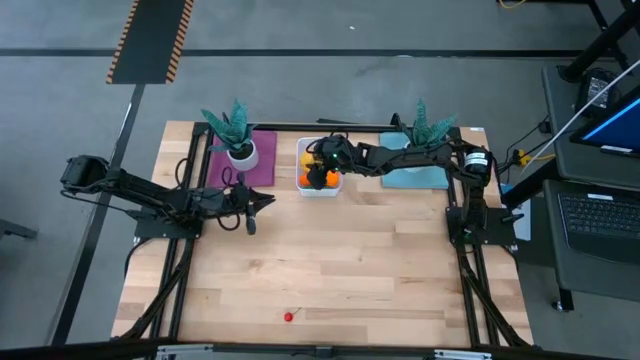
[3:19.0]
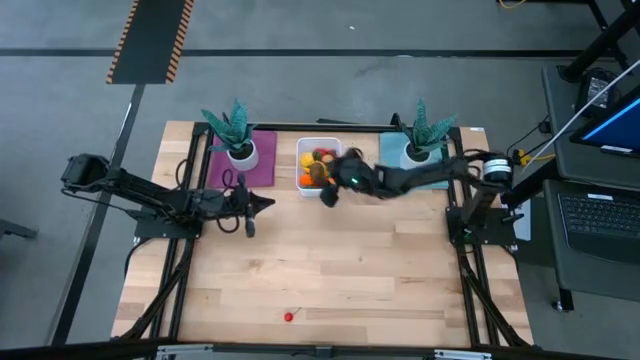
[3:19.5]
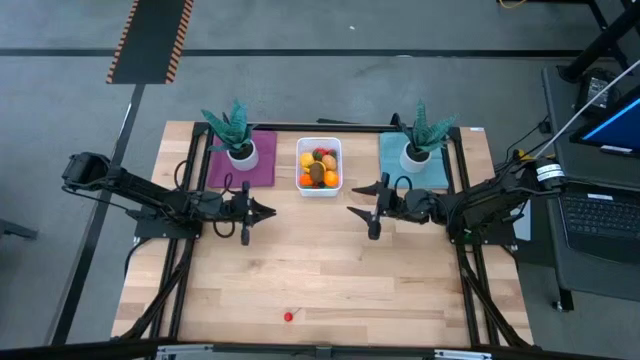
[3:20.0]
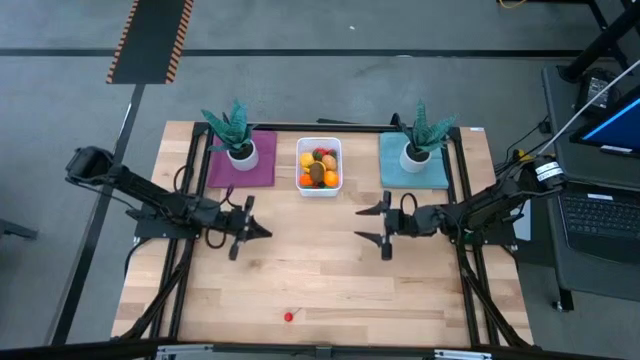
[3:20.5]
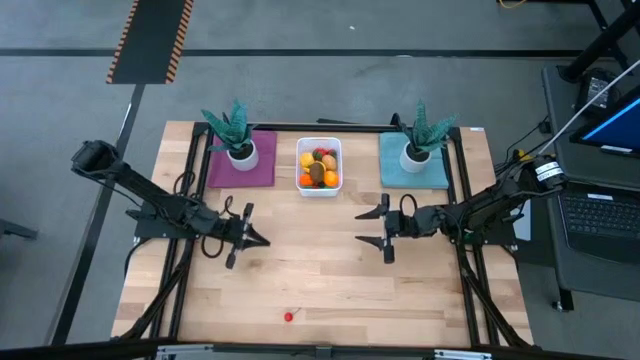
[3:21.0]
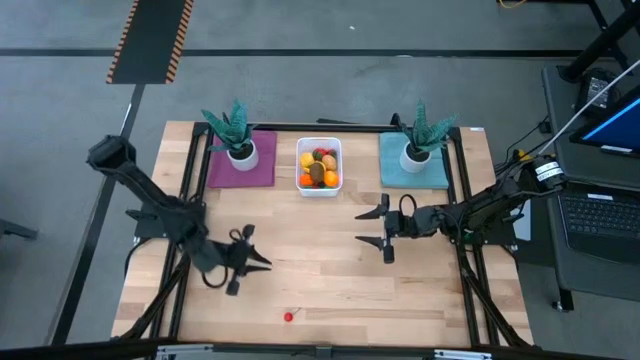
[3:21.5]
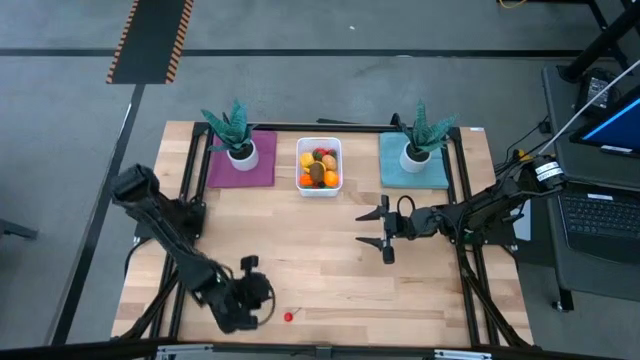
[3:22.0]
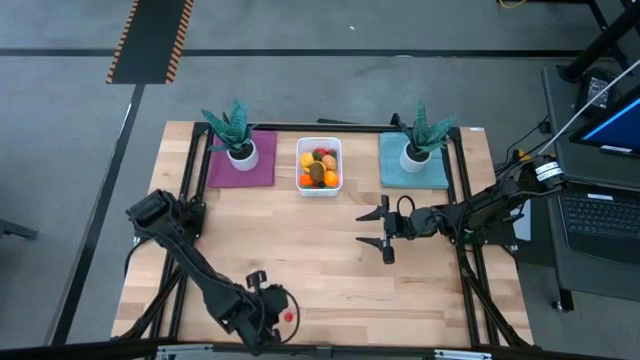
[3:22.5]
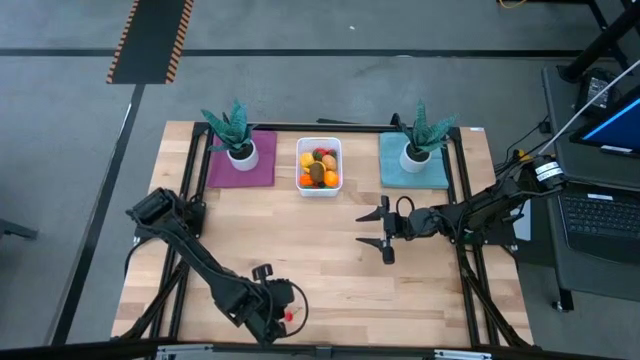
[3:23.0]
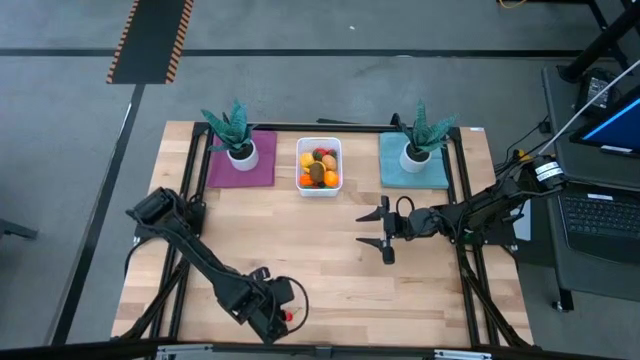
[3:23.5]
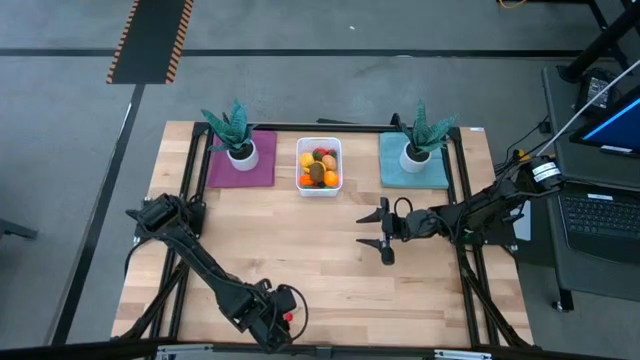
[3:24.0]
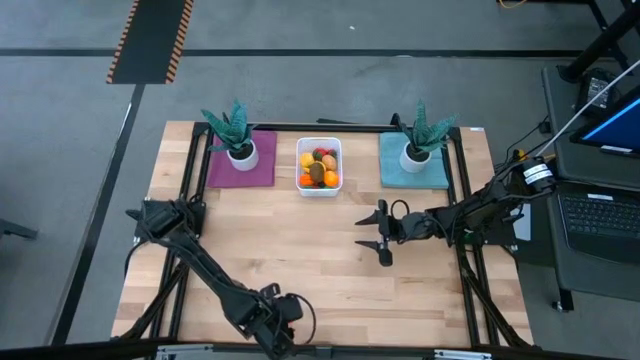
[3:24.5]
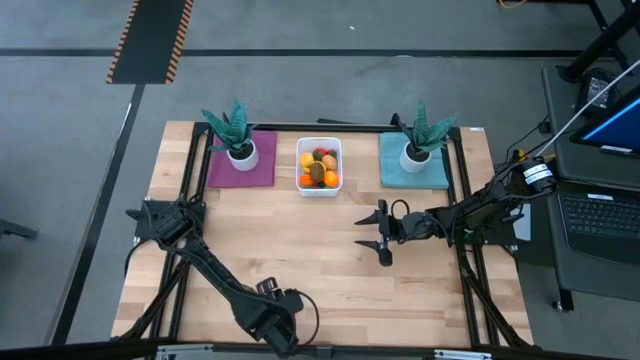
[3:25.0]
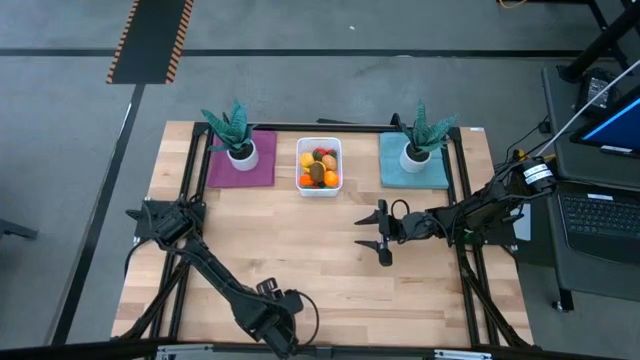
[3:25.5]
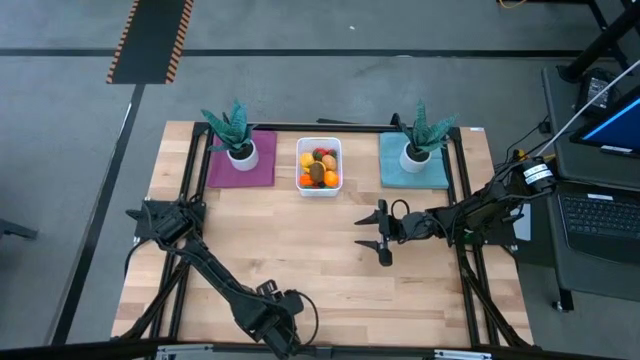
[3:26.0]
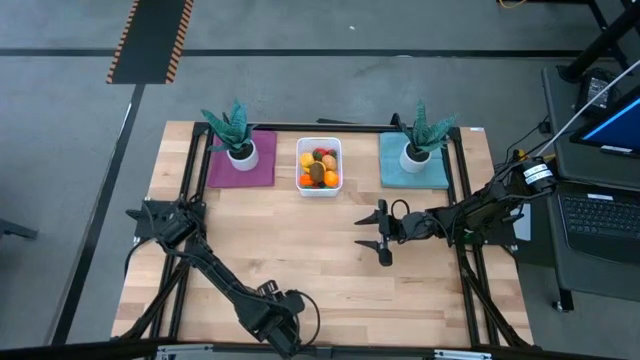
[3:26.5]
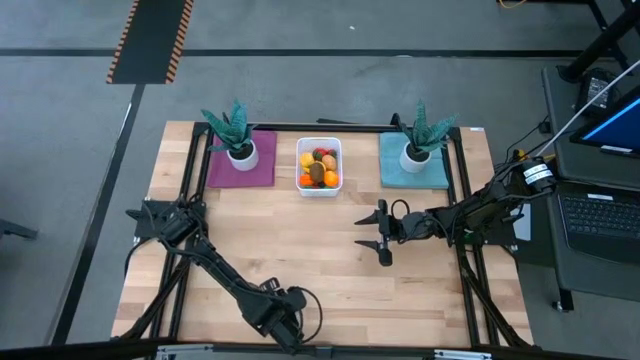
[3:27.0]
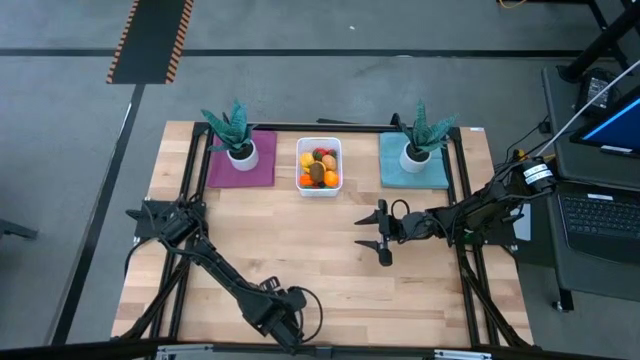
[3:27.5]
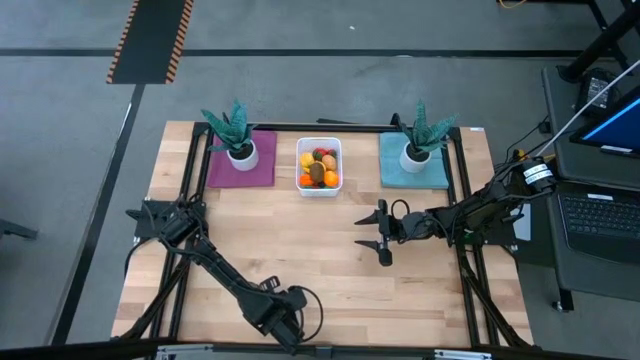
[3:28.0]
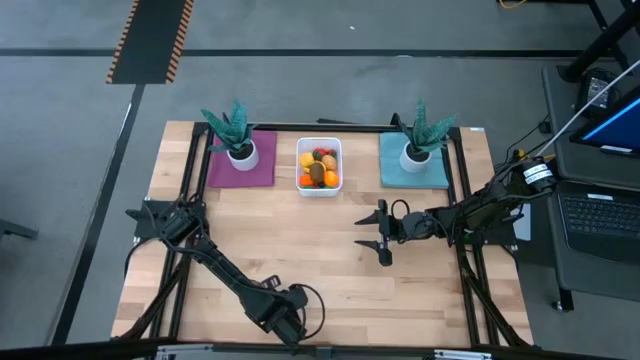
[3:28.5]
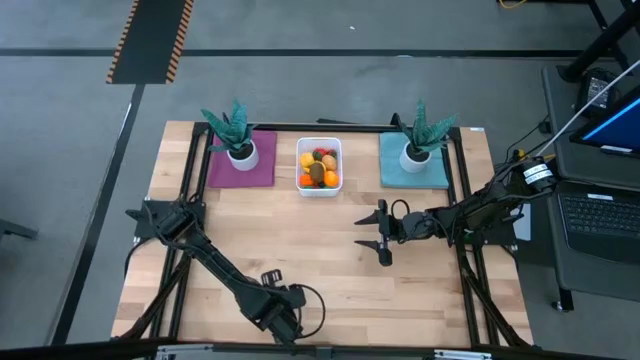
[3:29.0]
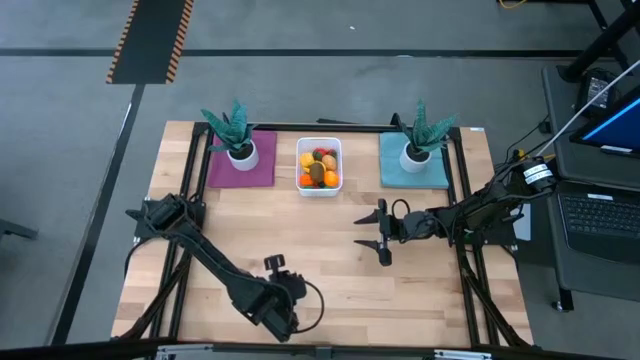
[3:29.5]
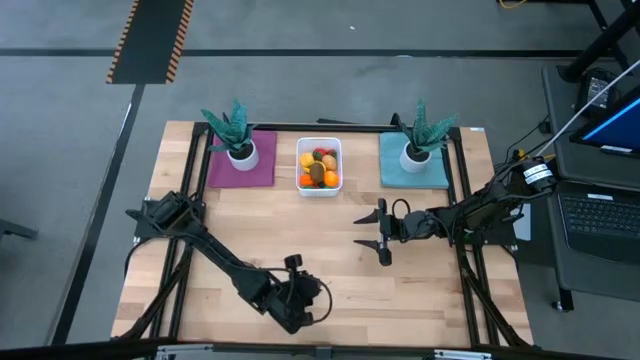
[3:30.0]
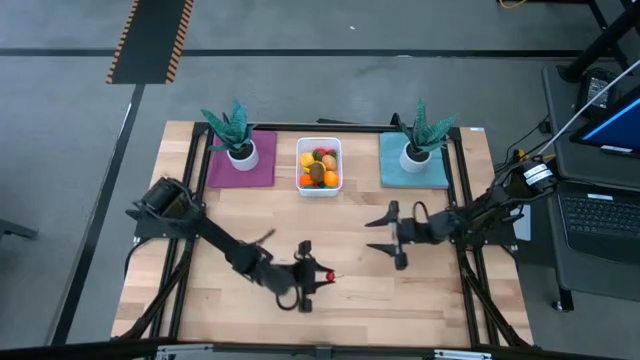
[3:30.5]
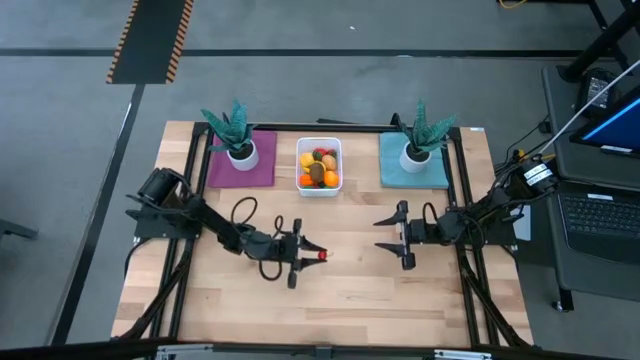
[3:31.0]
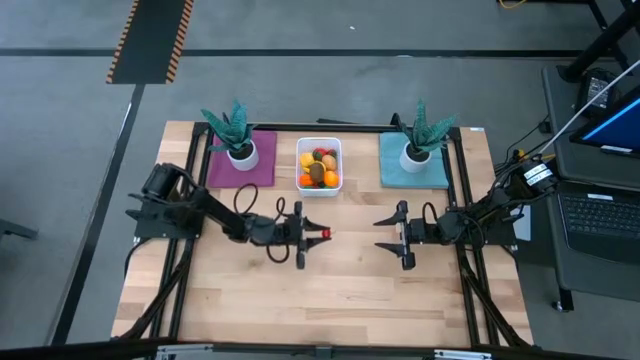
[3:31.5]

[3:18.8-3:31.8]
Task: Pick and placing Produce into tupperware
Put the red cherry into the white bin

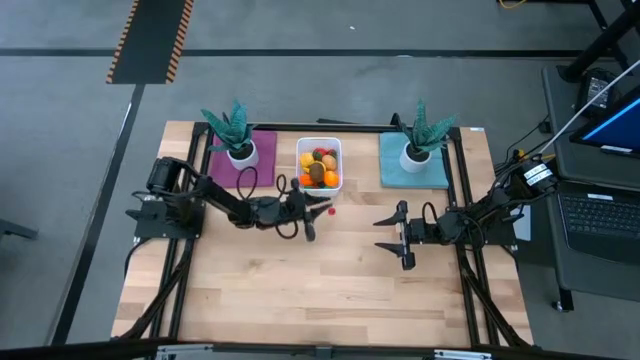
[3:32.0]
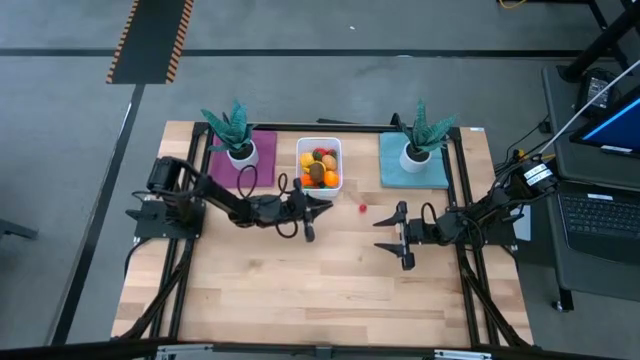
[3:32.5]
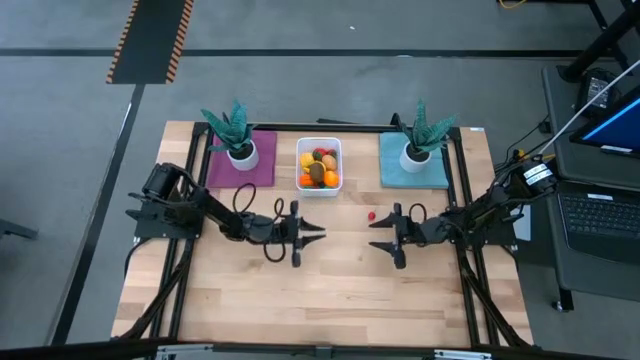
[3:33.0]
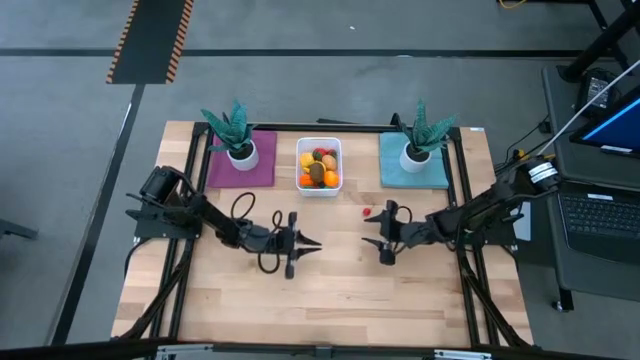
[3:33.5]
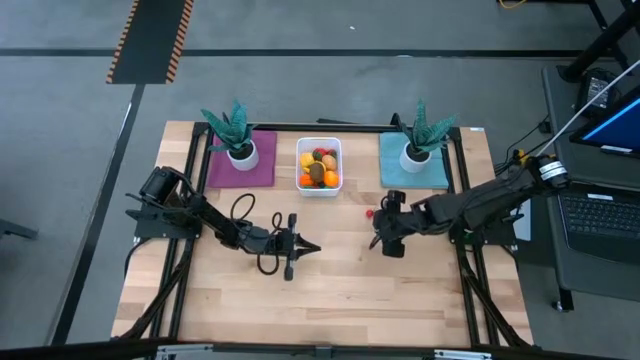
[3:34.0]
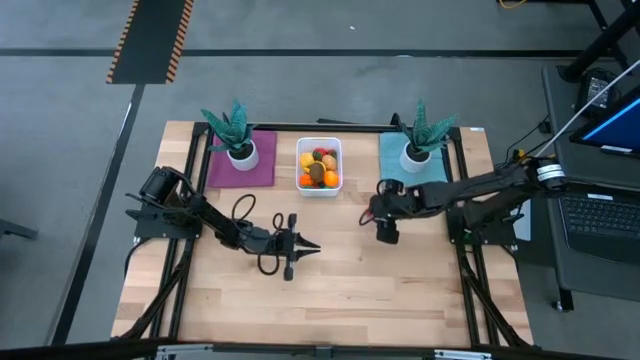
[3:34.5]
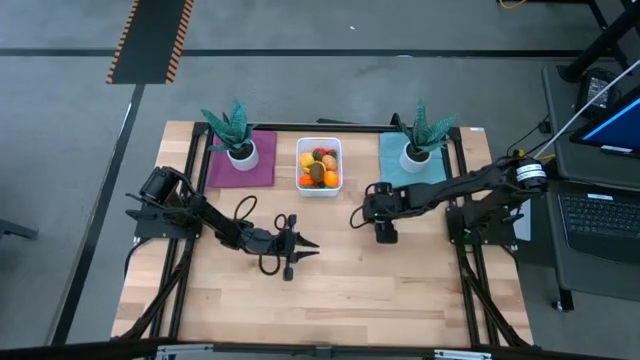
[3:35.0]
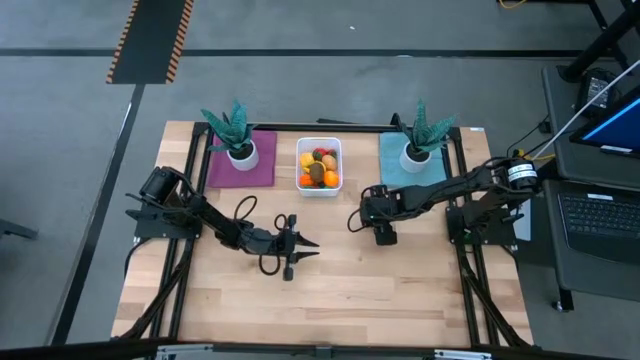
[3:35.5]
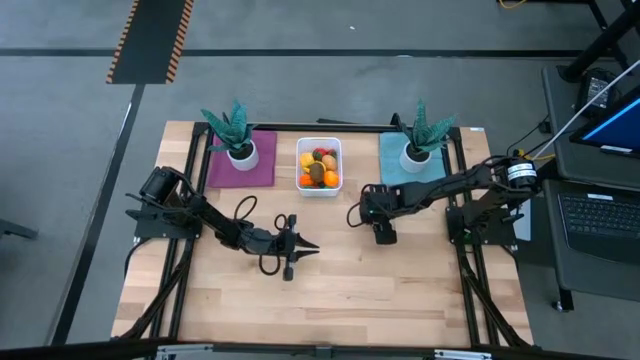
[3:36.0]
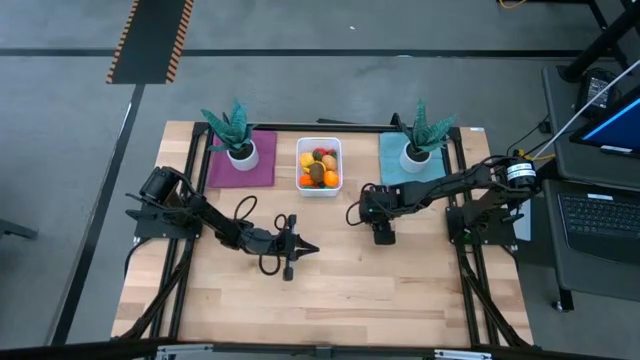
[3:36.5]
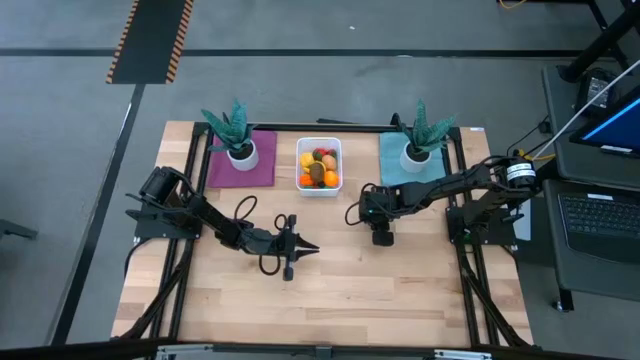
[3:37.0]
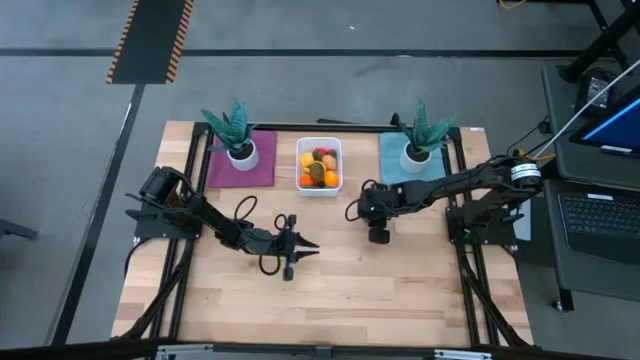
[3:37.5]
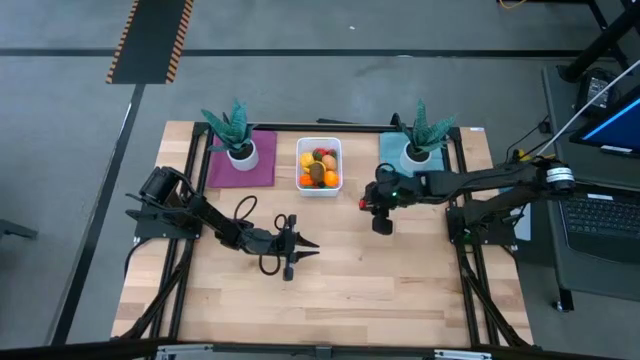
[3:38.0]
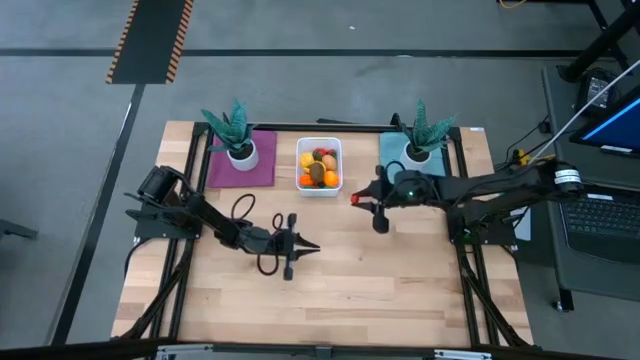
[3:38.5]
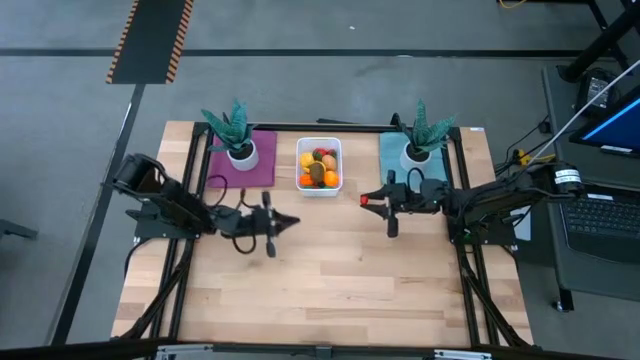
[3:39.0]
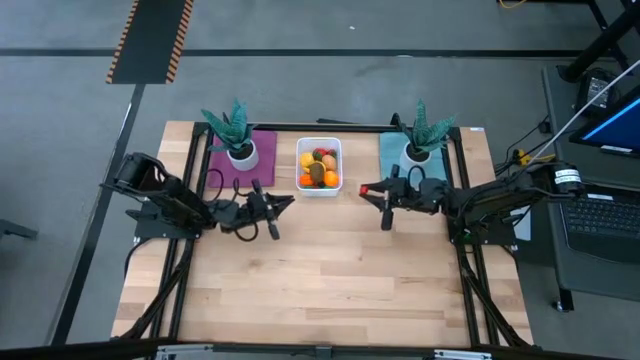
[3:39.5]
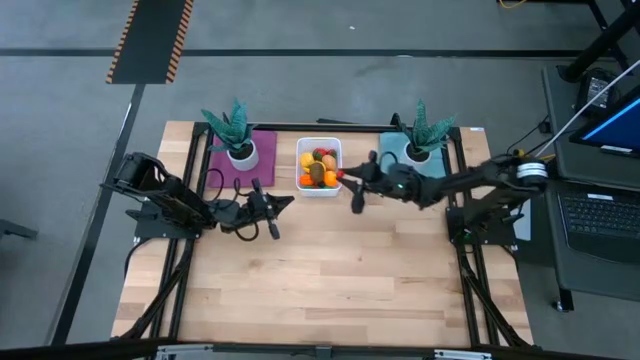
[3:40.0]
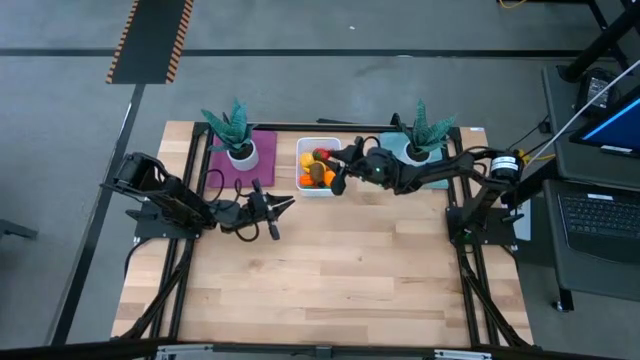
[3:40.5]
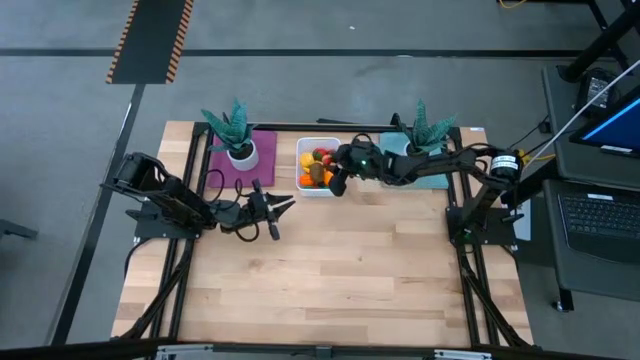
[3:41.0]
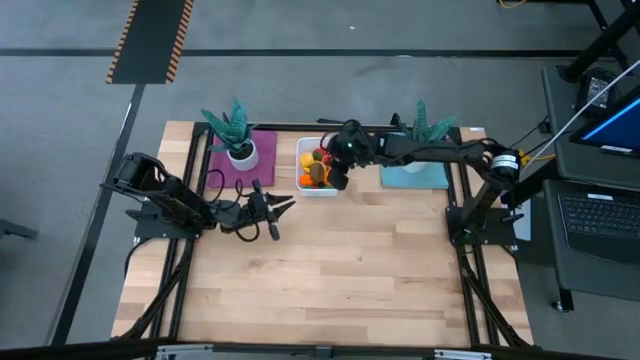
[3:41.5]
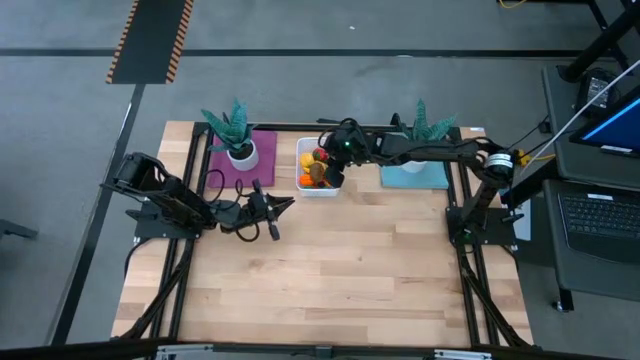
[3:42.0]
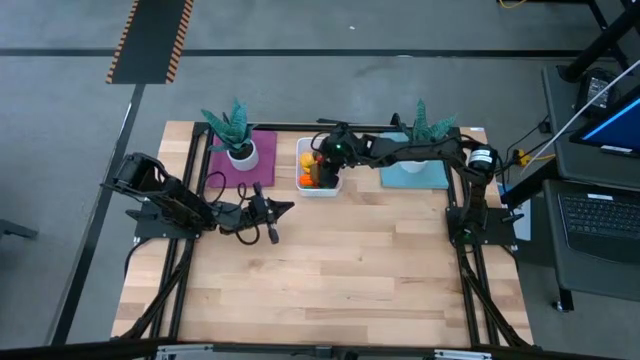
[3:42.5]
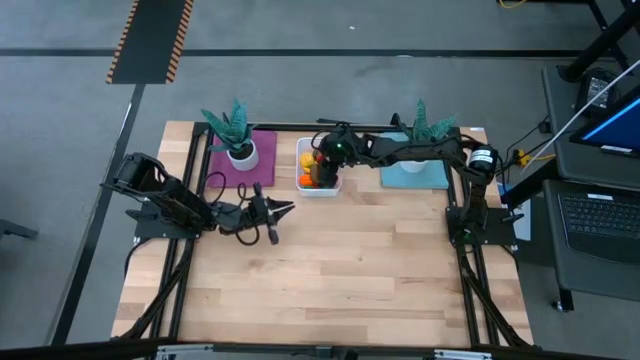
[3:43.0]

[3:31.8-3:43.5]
Put the red cherry into the white bin
